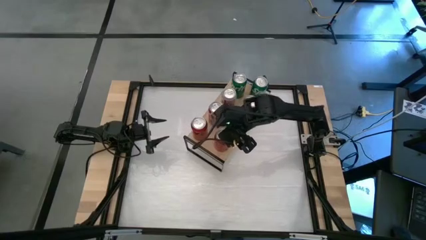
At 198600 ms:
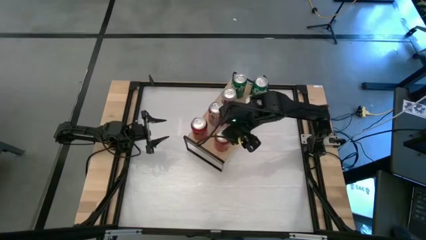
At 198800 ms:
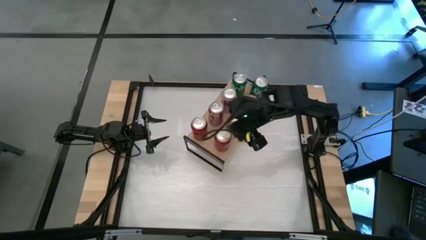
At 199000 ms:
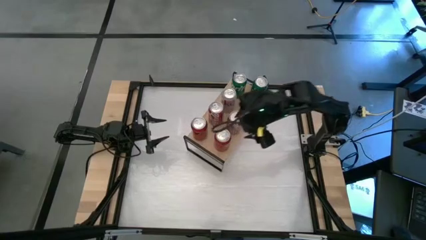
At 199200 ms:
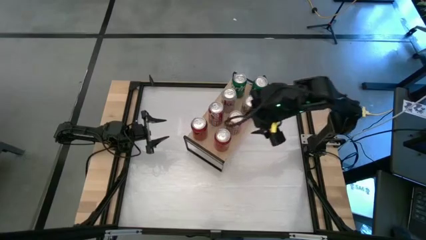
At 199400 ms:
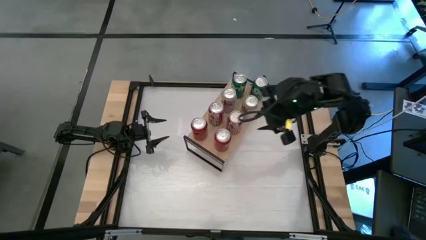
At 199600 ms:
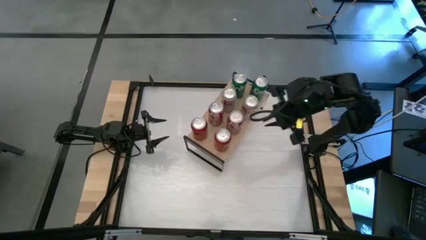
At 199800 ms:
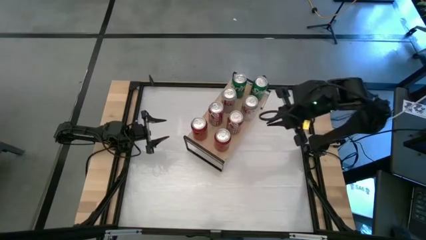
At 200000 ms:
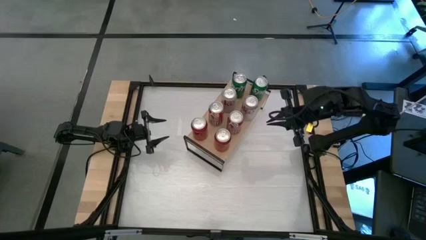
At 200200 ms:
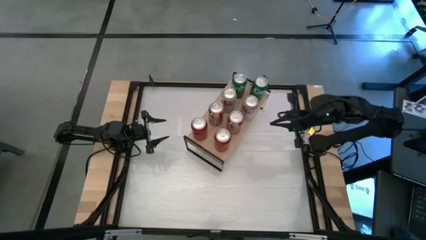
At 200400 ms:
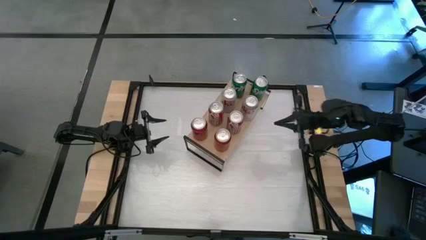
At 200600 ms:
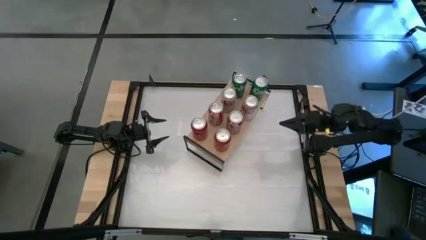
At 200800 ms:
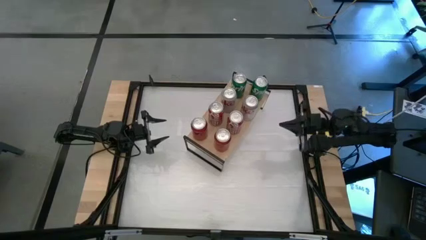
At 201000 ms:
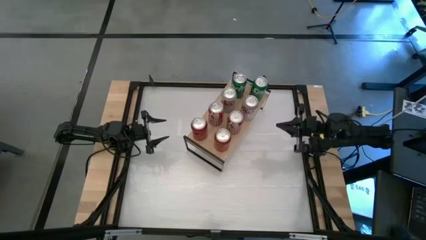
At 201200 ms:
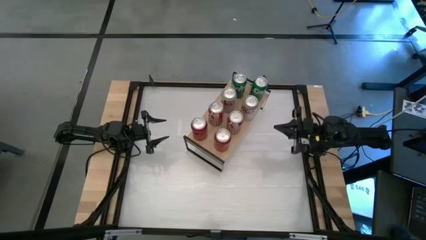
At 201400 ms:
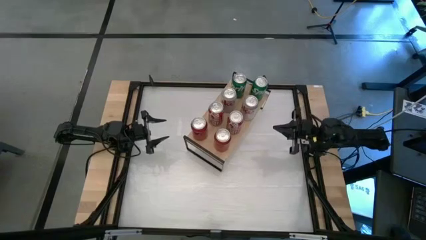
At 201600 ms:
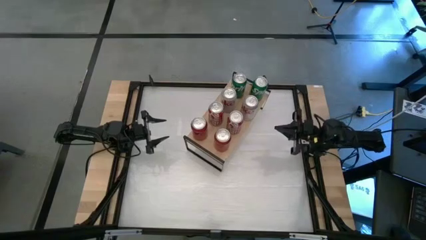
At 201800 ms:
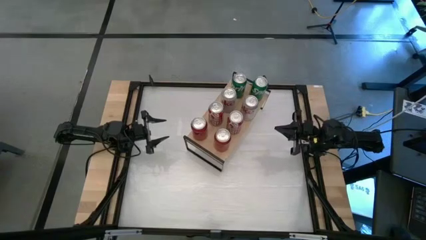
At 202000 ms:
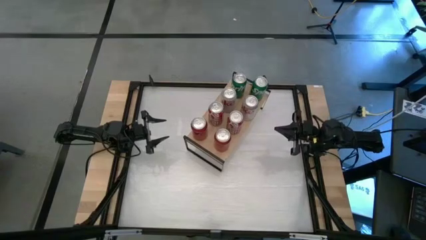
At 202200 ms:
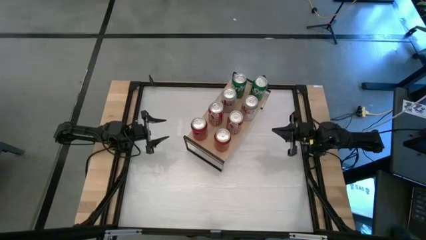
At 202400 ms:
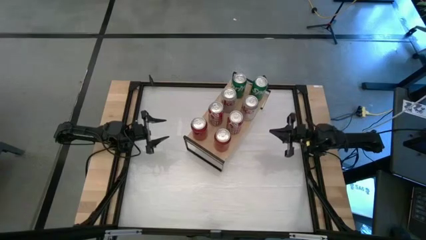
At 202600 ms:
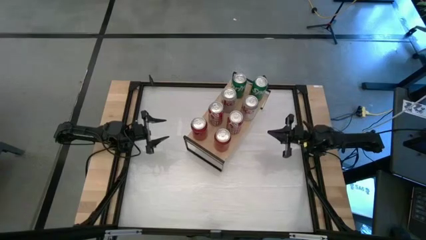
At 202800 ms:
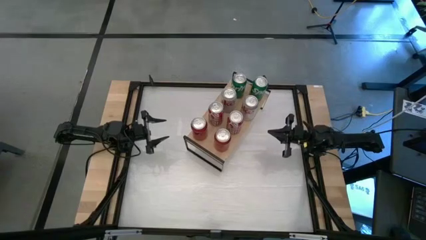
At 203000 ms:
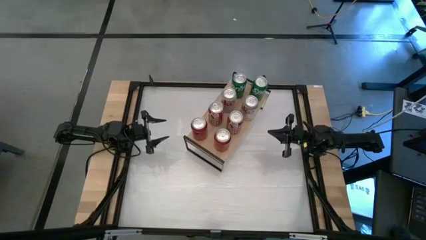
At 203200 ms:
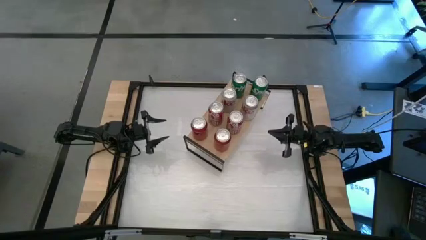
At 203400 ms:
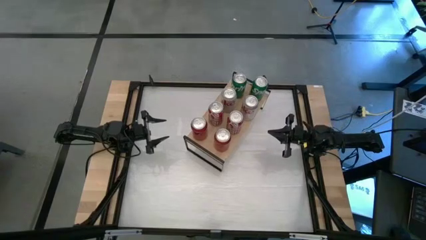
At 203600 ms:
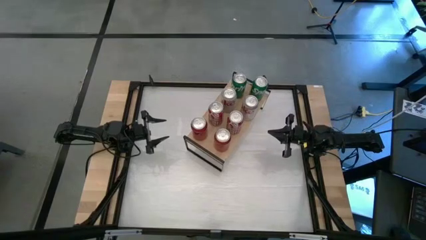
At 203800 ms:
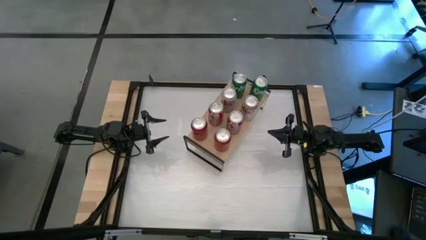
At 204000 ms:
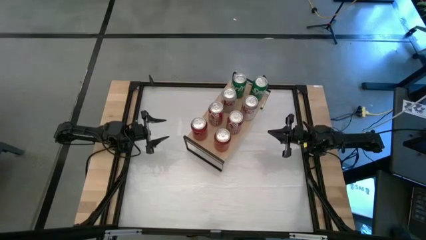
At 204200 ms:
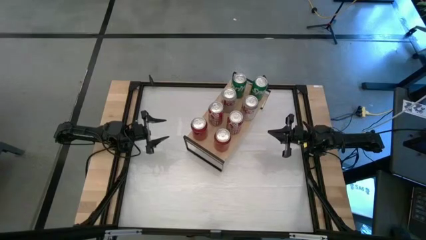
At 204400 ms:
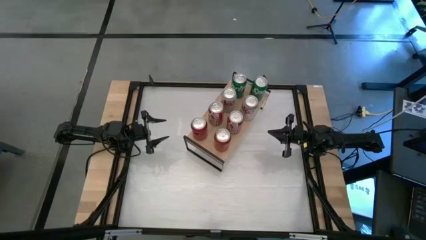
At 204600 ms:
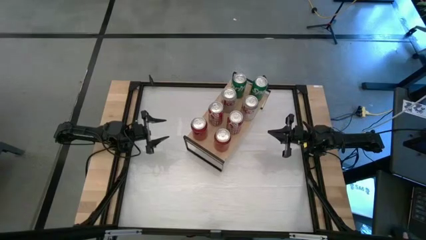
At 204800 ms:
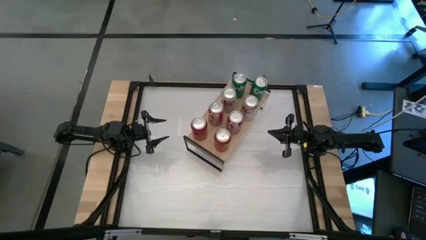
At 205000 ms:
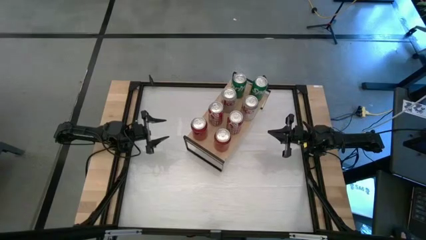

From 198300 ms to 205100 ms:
Task: Place canned beverage on shelf
Return to Home Position

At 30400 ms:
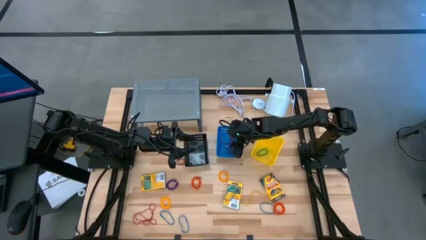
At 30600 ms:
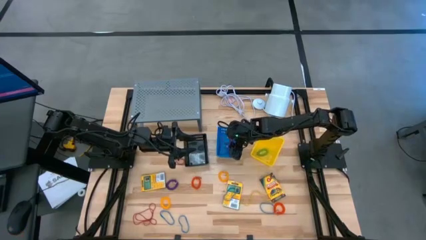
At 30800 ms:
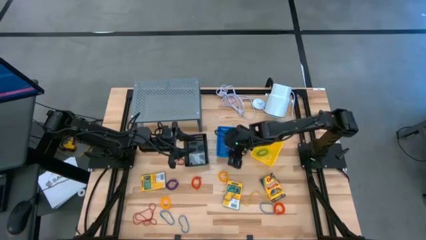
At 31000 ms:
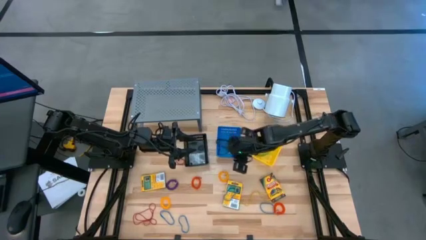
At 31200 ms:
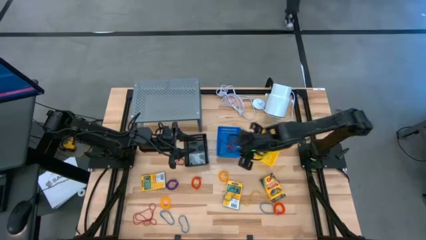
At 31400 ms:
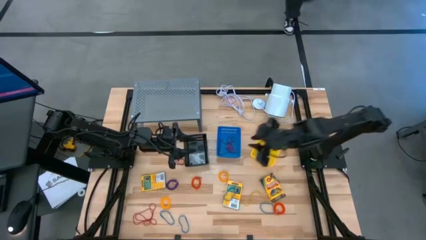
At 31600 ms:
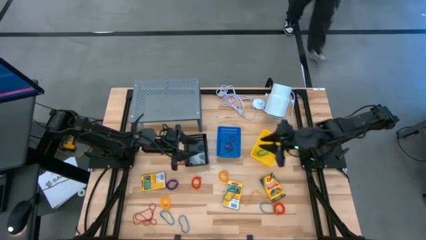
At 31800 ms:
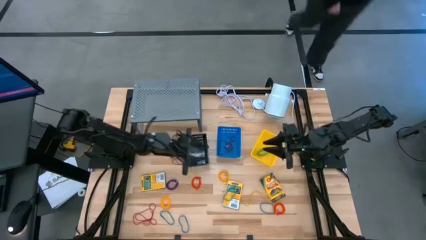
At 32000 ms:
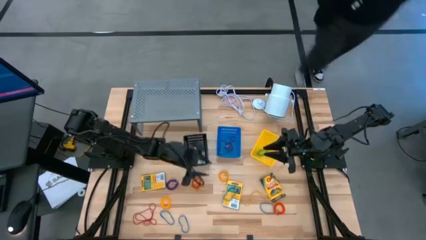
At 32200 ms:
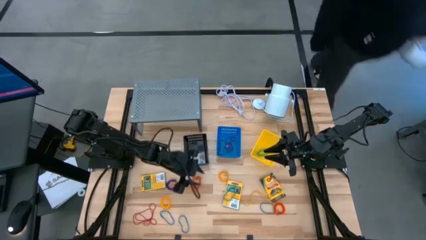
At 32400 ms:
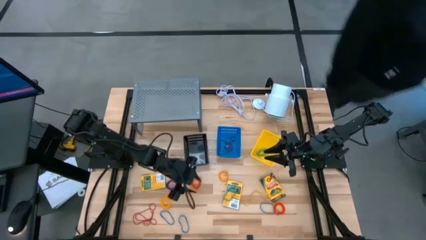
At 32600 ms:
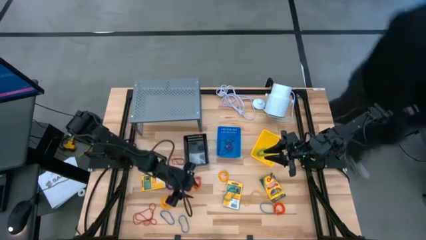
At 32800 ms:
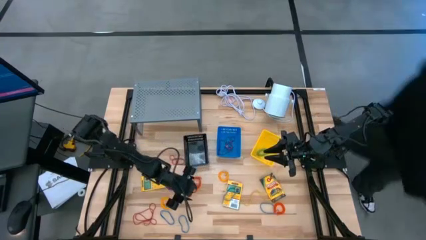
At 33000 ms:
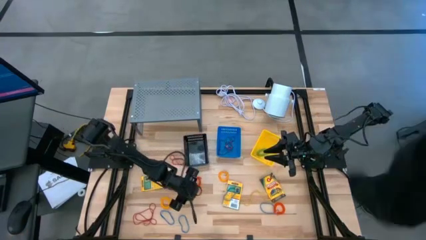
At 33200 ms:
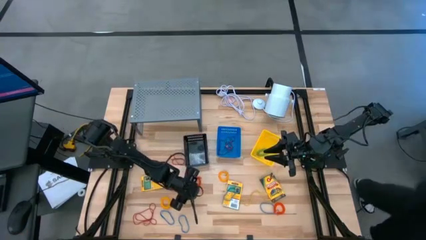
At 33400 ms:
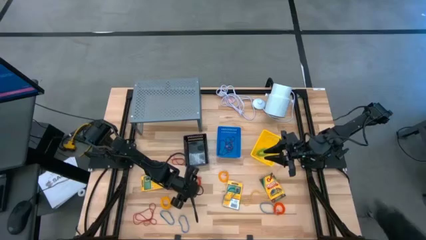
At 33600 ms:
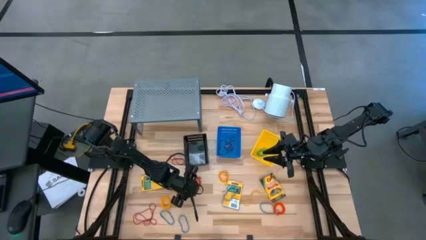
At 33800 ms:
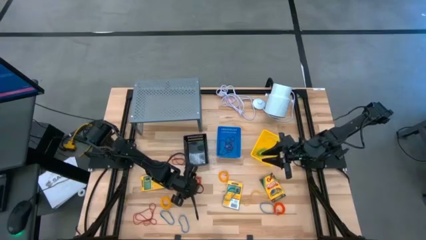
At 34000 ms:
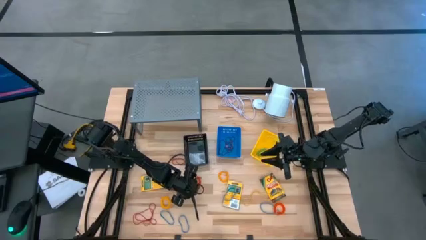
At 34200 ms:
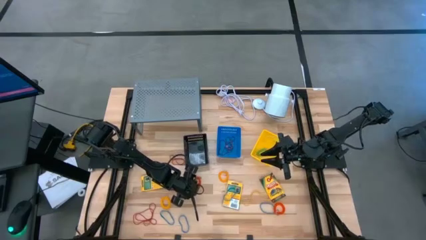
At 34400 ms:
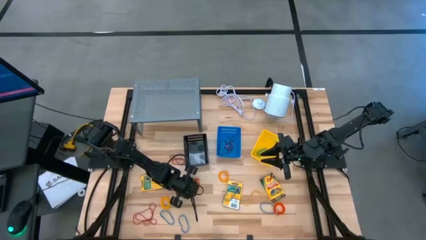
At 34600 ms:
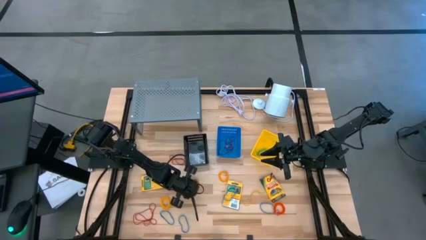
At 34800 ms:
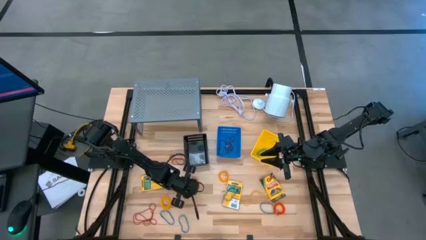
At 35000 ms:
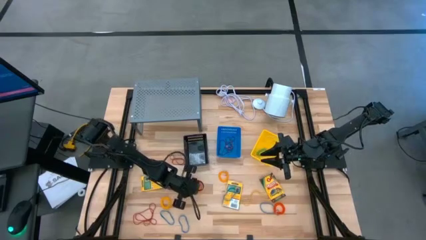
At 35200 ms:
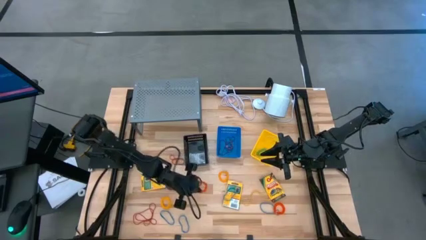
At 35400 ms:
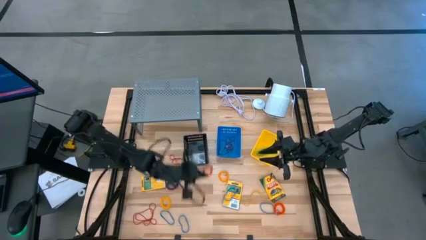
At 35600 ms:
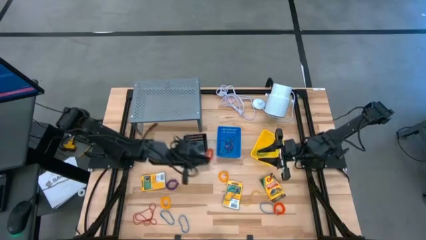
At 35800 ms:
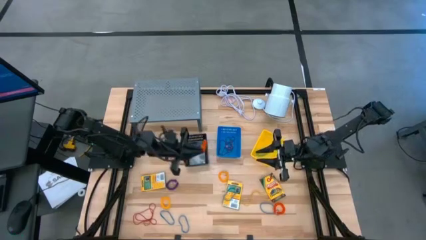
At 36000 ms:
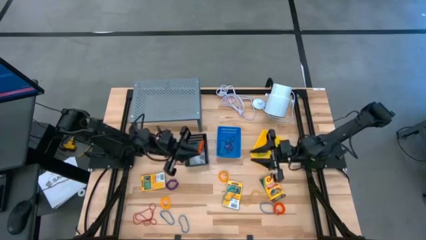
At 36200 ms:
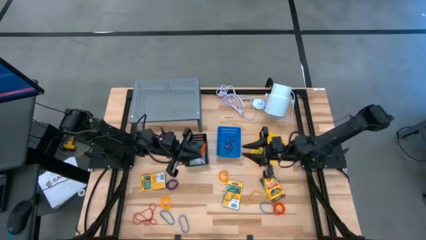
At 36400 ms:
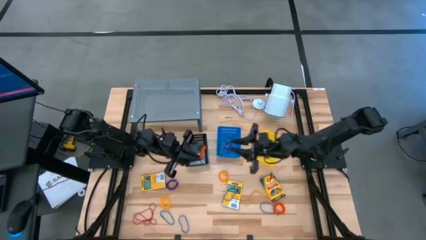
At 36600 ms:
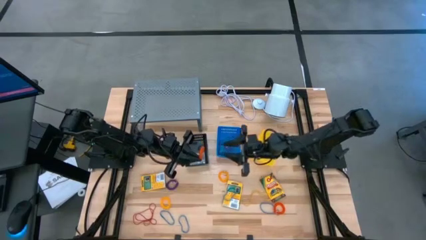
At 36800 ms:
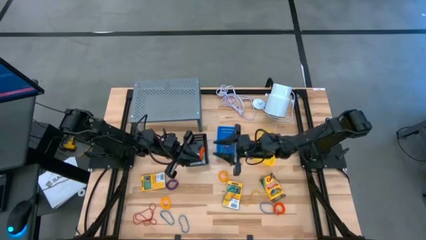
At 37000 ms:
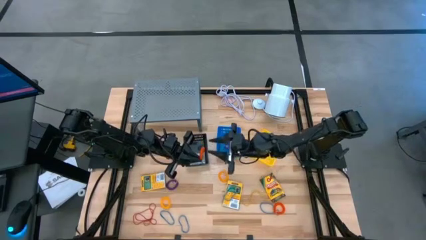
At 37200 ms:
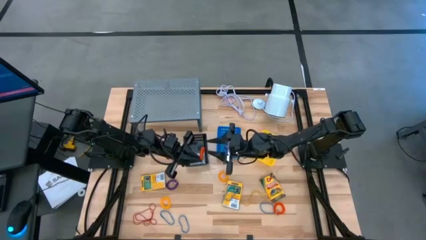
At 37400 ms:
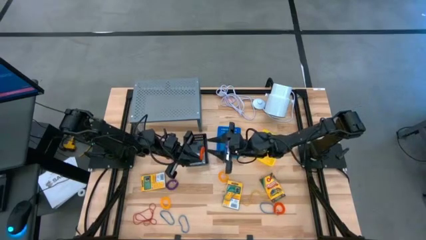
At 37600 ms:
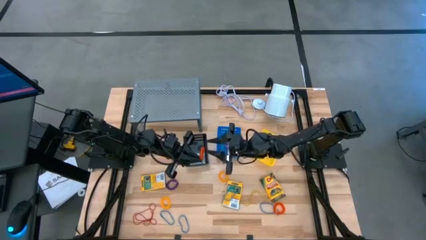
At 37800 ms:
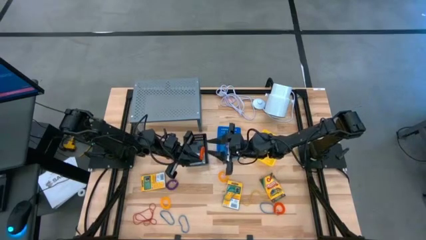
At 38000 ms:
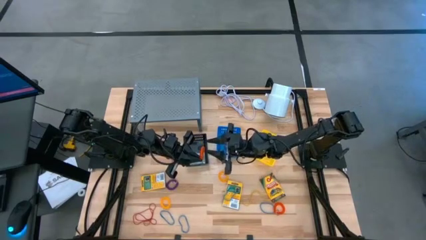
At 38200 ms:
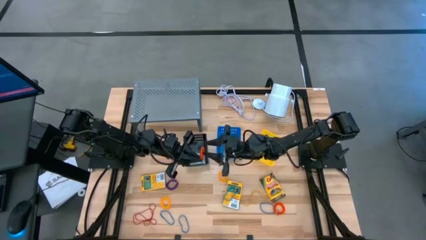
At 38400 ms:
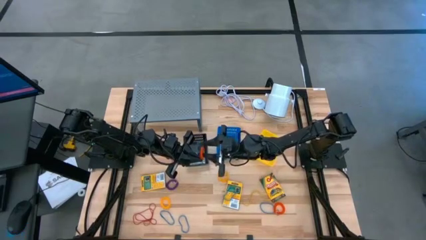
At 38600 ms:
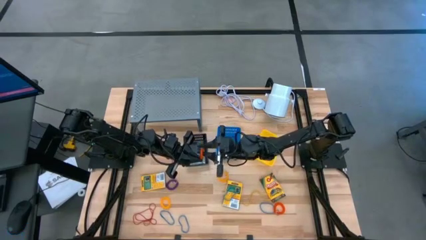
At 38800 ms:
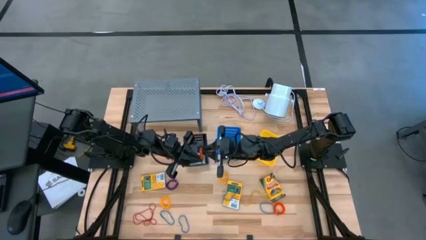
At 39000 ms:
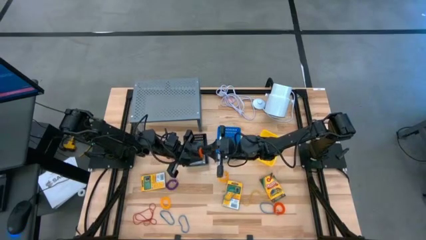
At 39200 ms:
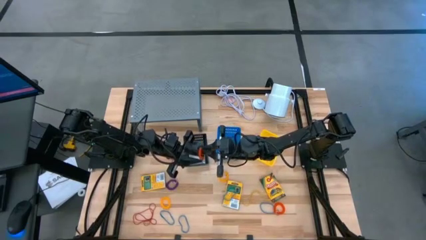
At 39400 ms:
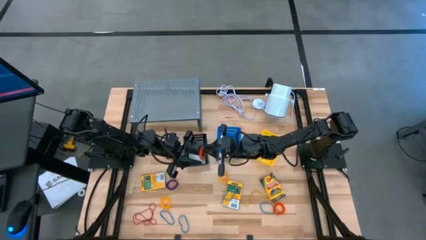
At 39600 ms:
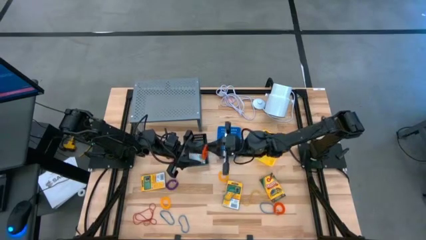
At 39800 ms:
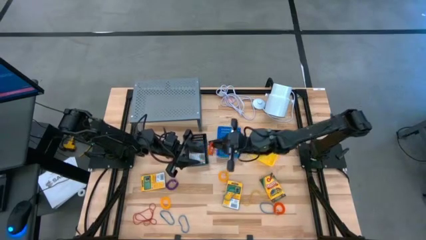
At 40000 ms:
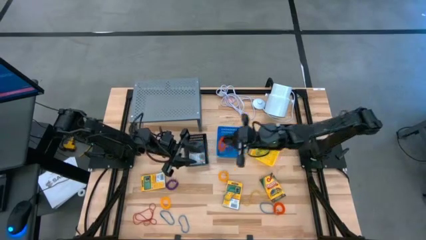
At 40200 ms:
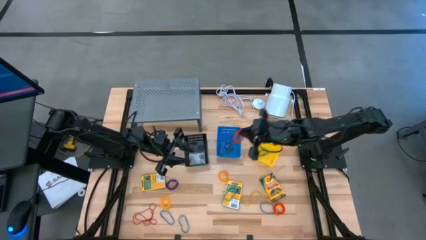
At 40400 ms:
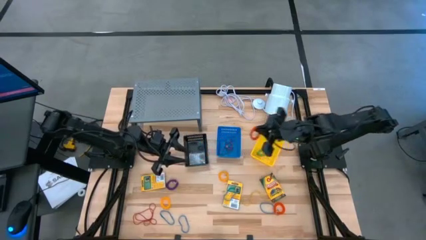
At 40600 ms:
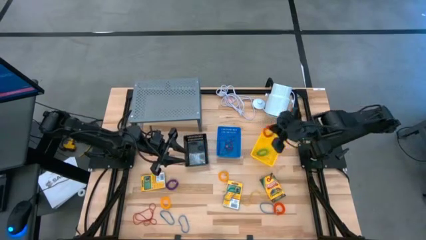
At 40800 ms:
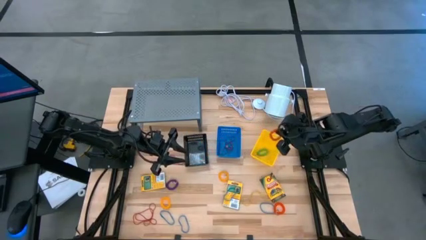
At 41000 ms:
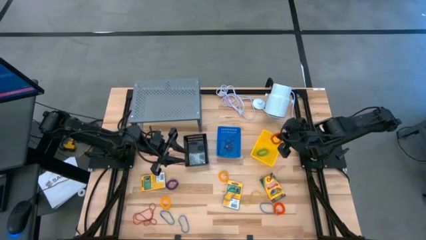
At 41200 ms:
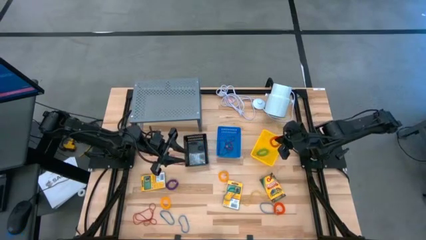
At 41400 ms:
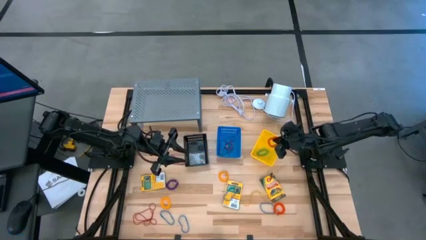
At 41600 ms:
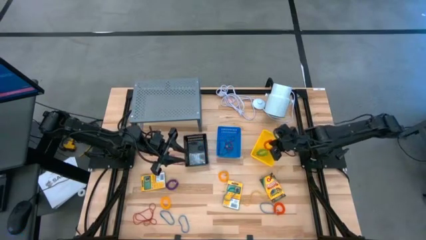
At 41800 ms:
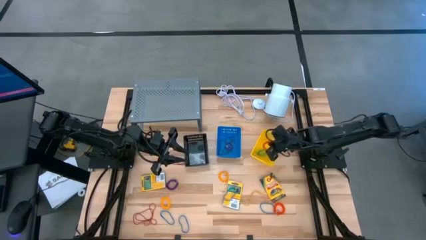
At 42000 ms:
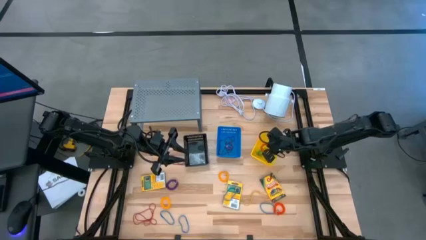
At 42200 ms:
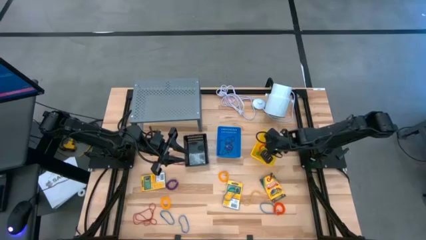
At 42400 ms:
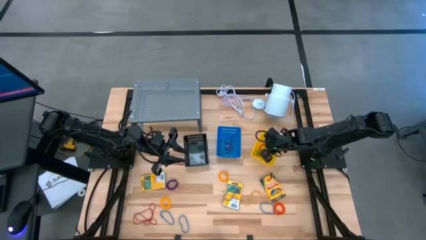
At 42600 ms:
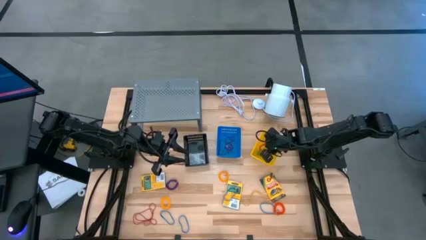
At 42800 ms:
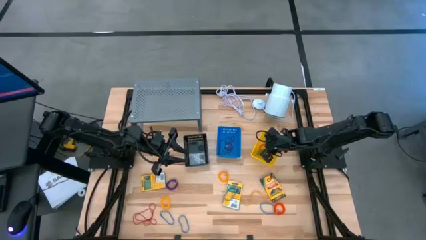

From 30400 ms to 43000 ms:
Task: Pick & Place Office Desk Supplies
Put the orange stretchable key holder into the yellow basket
